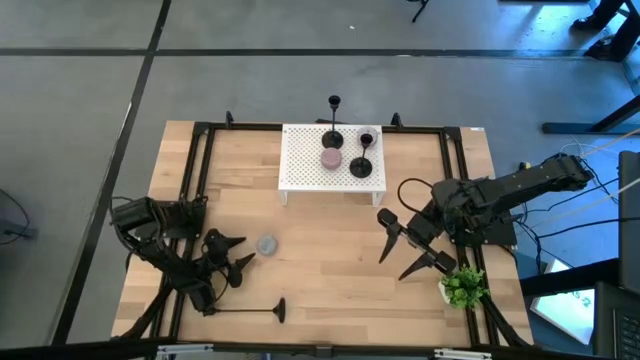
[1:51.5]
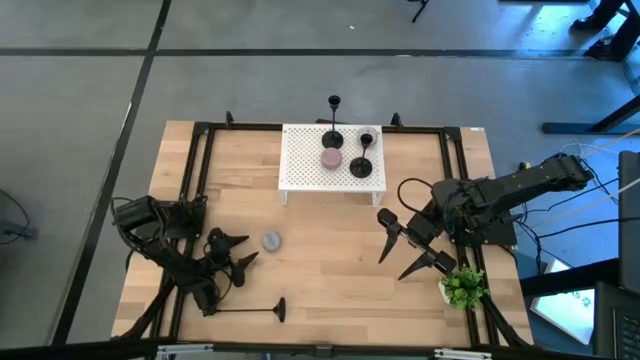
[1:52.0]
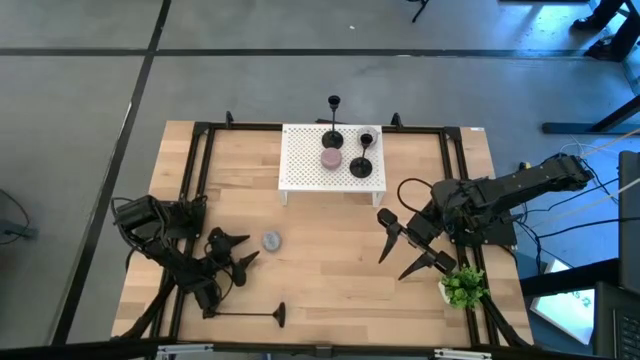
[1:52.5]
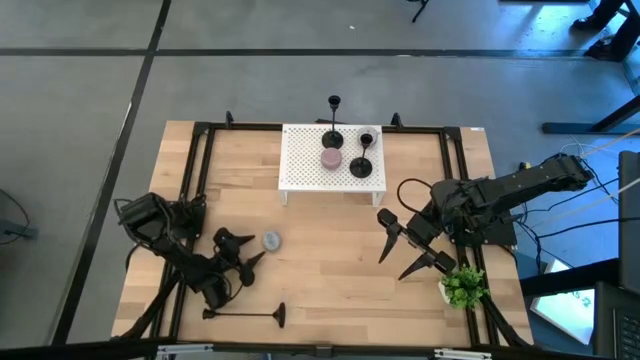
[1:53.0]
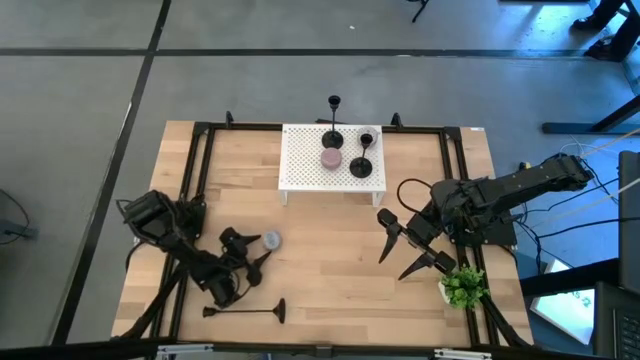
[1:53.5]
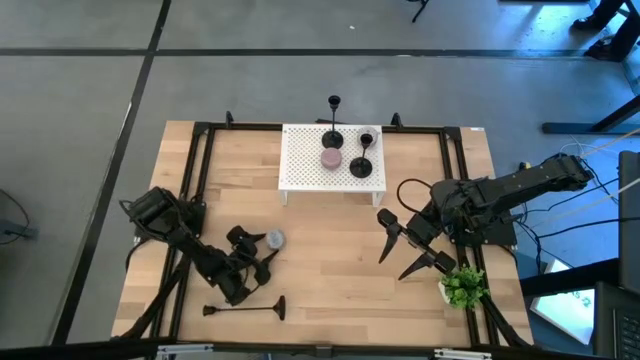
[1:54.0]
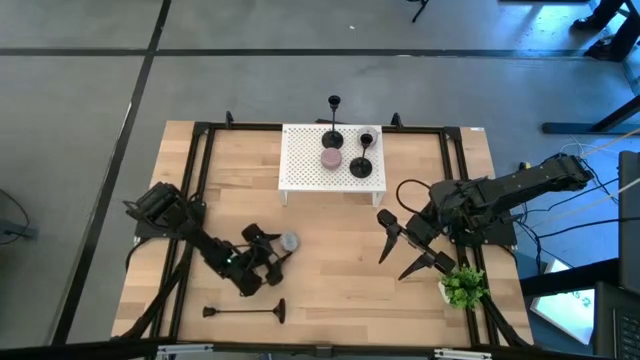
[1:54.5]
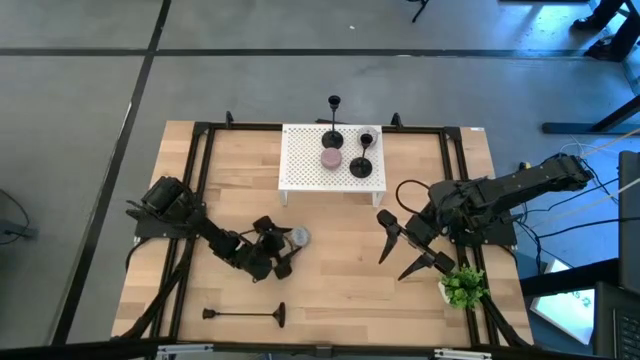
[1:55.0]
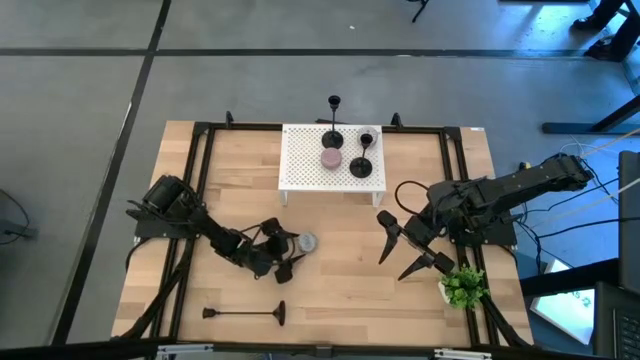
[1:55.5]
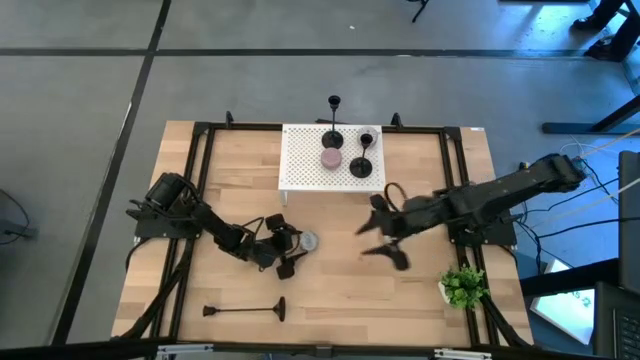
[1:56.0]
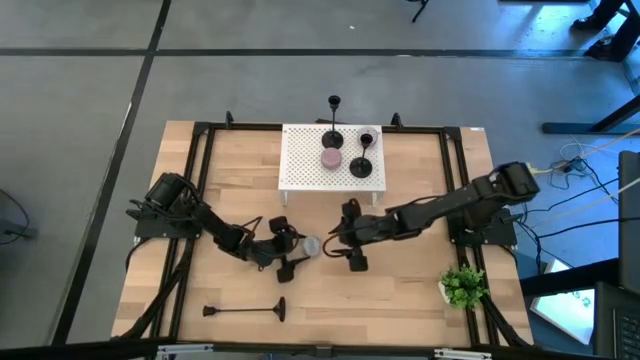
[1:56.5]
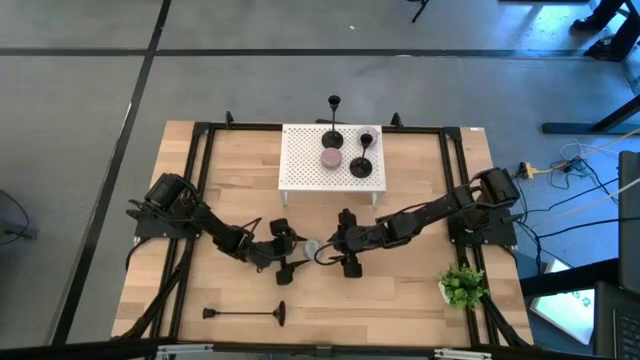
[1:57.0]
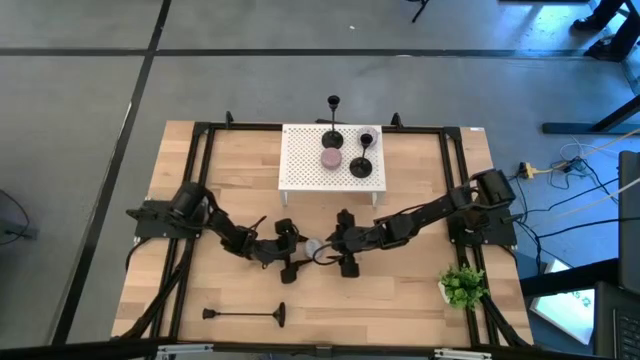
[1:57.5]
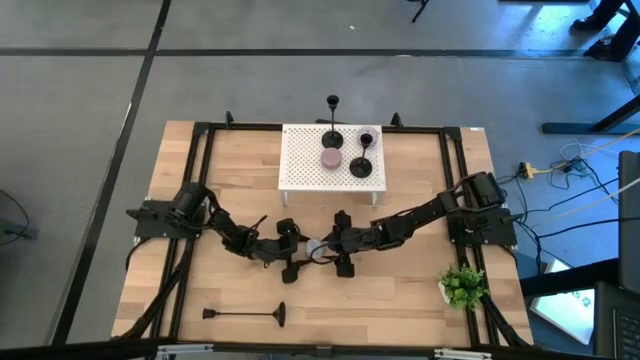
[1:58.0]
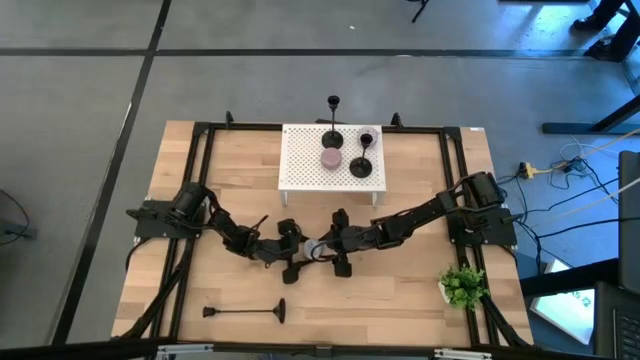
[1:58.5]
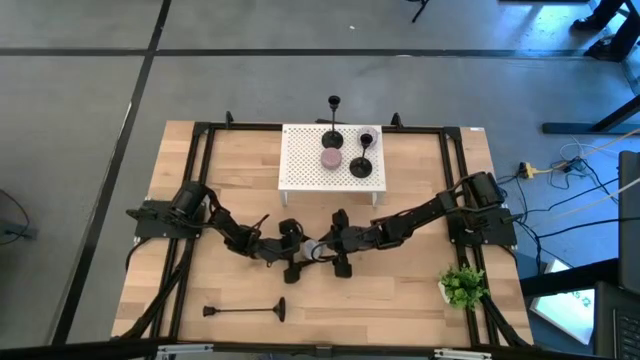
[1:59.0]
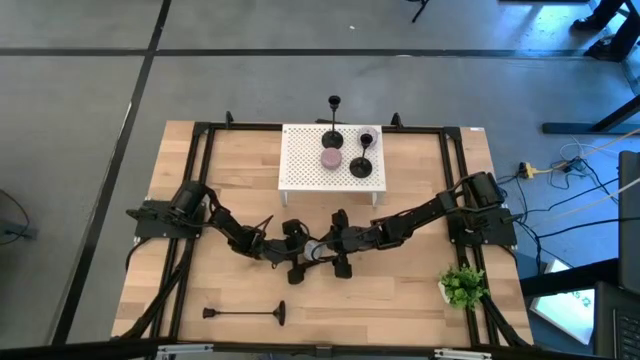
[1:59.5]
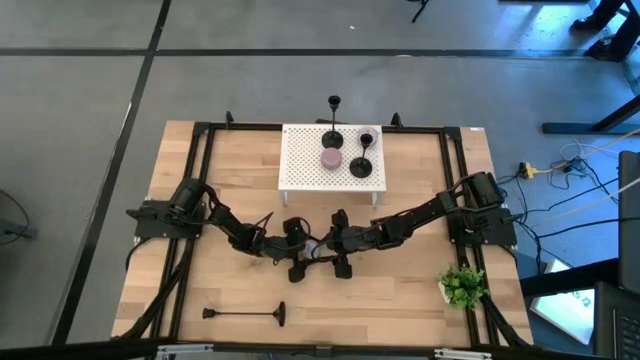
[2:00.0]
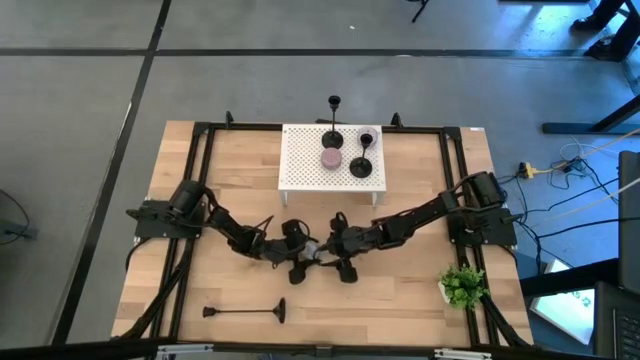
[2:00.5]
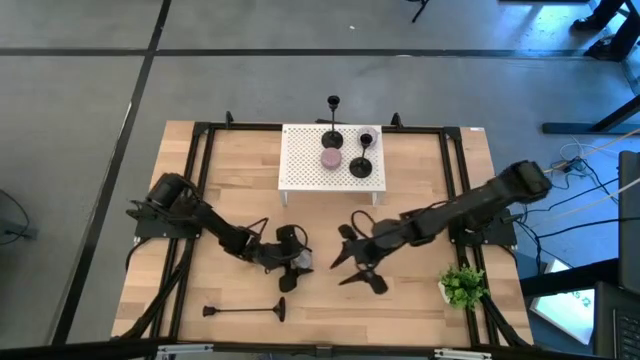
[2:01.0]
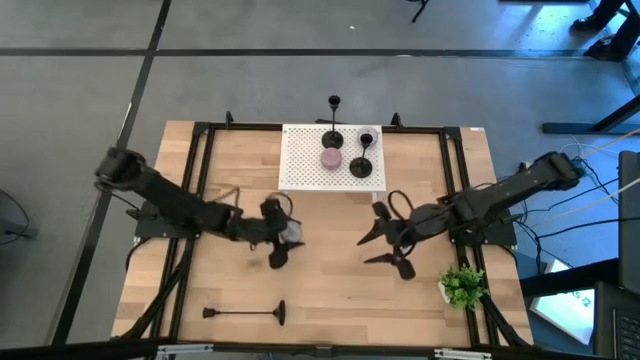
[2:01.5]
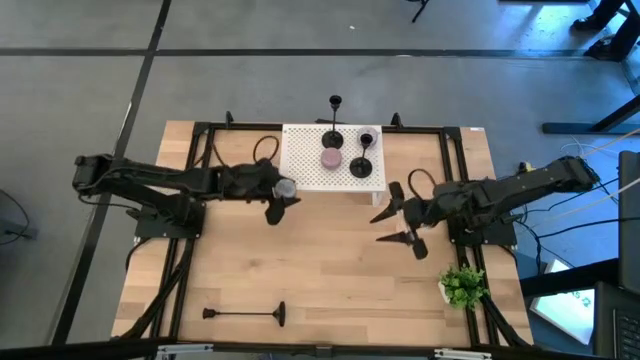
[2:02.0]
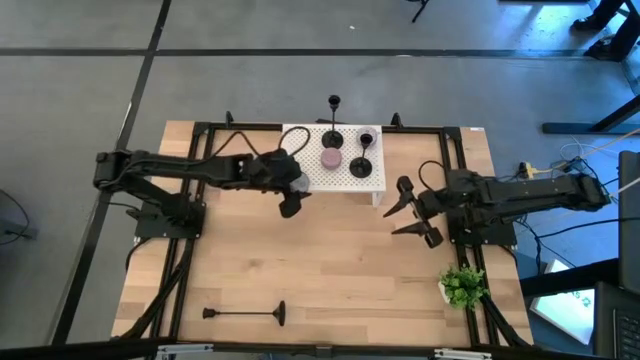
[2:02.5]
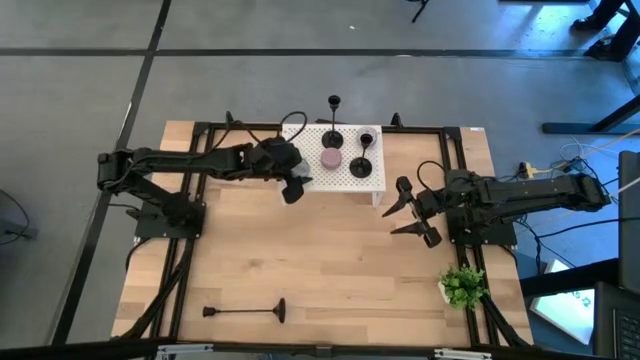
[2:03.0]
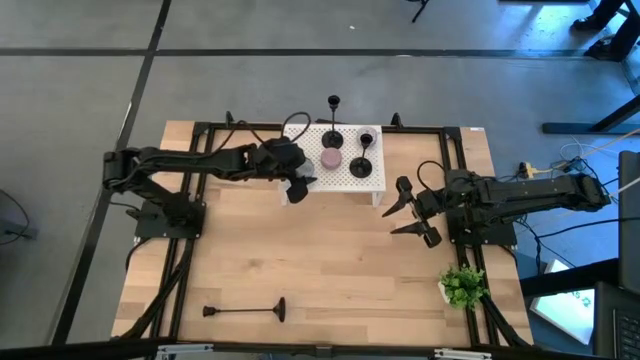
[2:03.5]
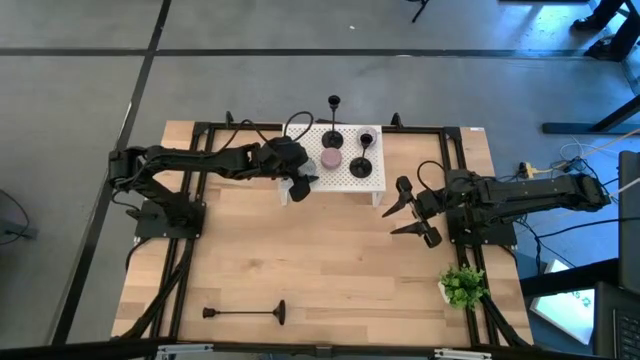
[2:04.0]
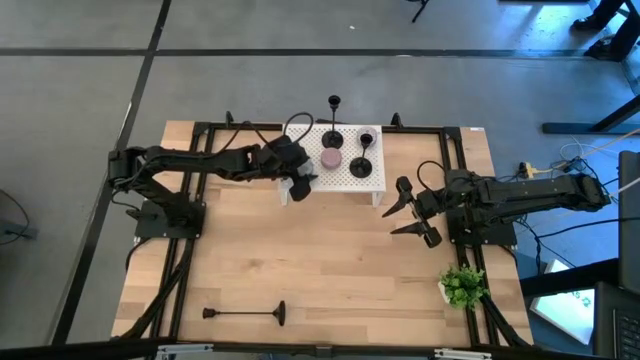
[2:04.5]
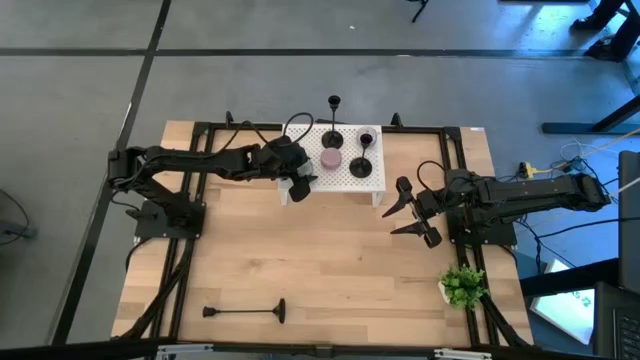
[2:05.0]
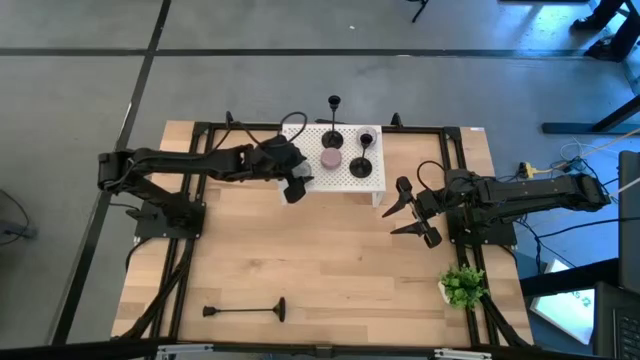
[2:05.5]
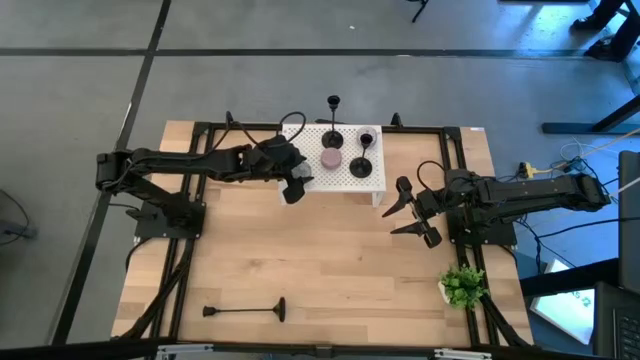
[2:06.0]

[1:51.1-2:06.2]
Task: Pick & Place candle stick holders
Put the gray scented candle on the shelf

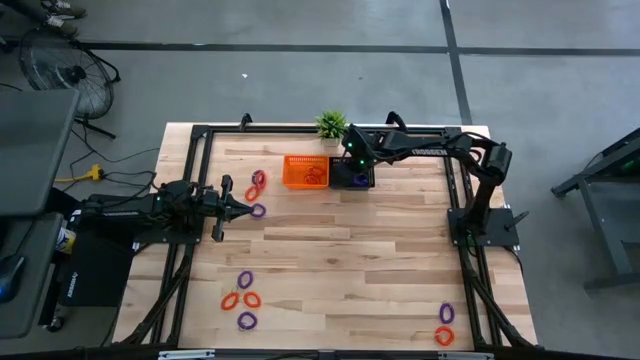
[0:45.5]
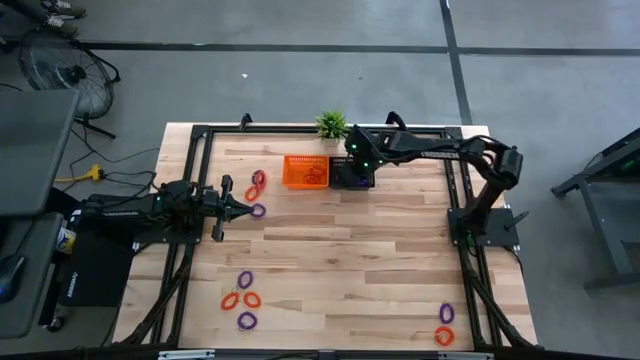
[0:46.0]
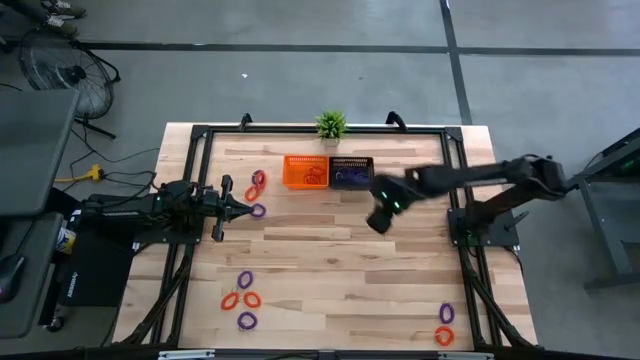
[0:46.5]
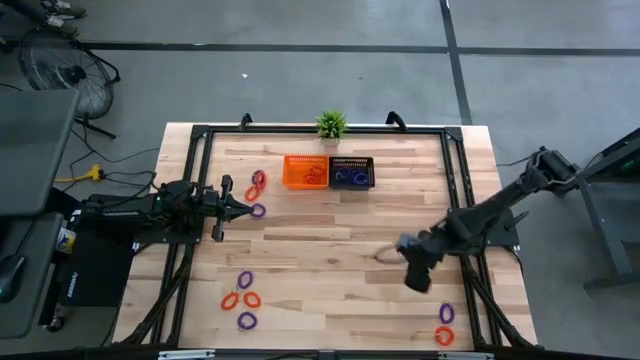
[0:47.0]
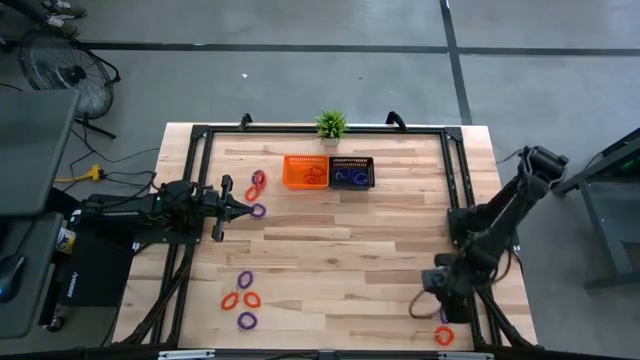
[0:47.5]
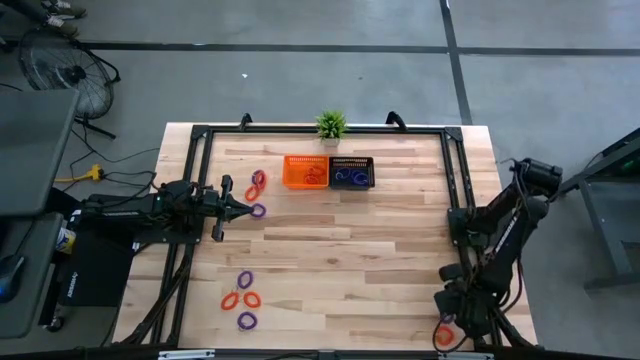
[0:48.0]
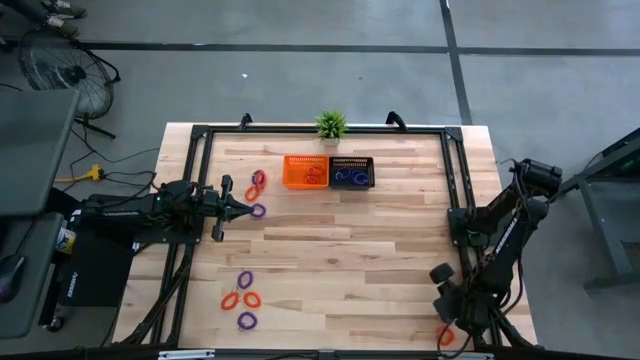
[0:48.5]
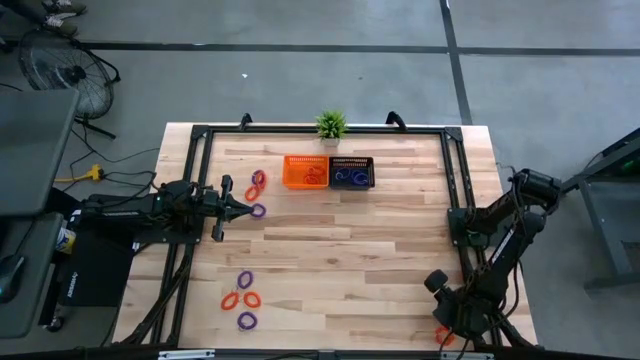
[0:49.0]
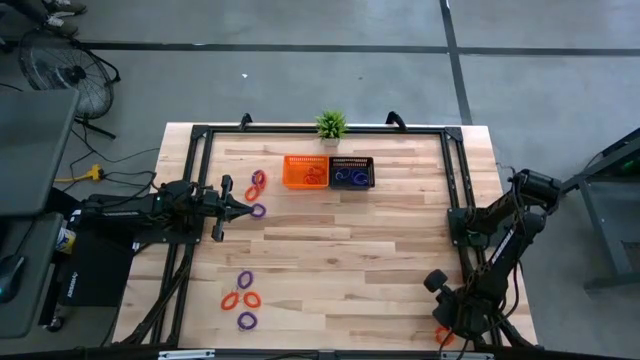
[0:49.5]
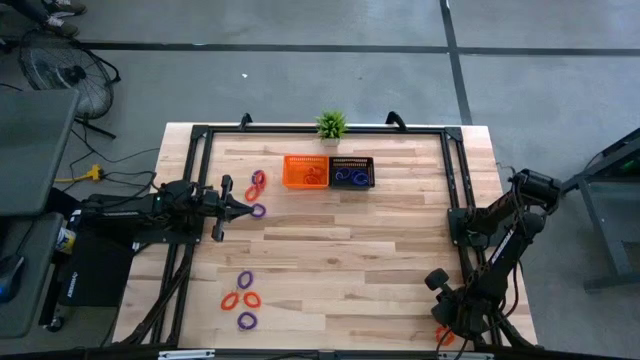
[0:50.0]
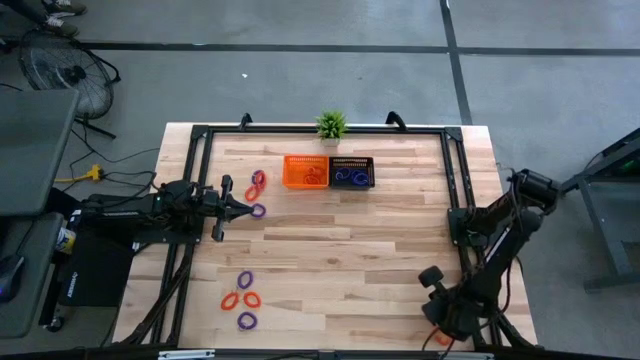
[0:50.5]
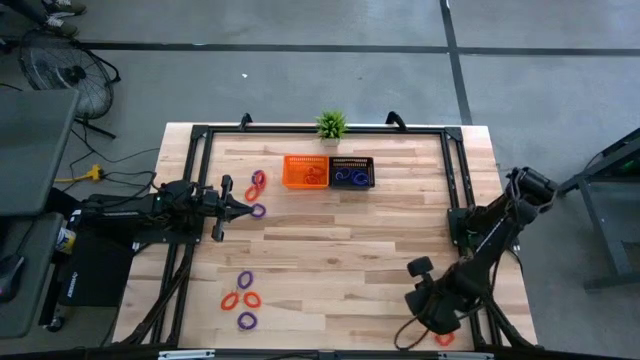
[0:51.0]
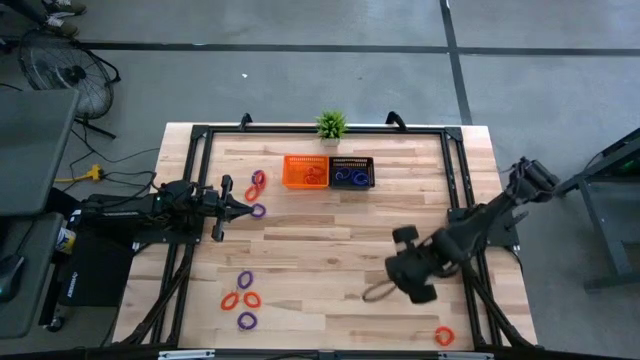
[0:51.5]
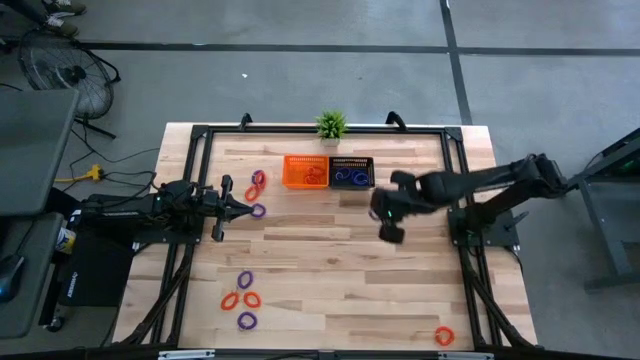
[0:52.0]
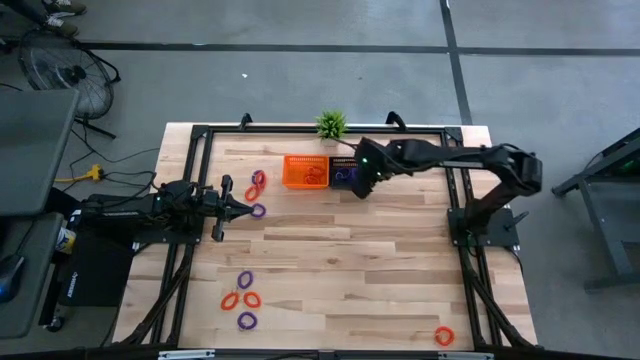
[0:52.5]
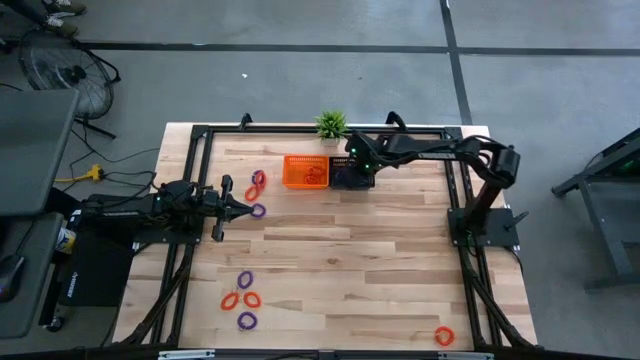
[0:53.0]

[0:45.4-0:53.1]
Task: Sort spring keychains into baskets
Put the purple spring keychain into the black basket
